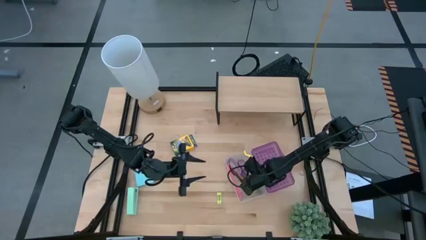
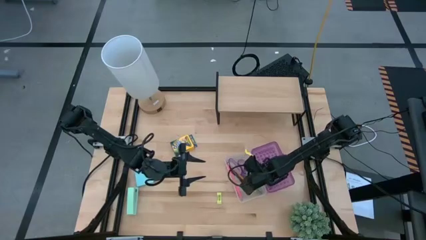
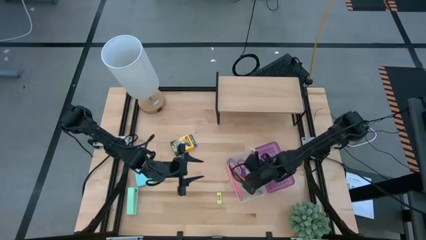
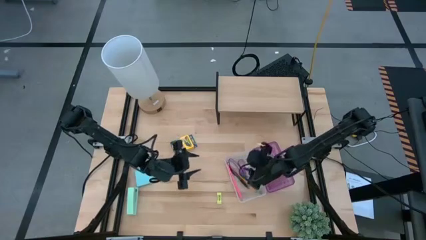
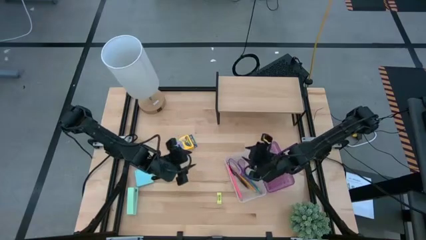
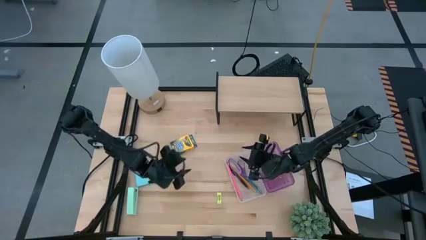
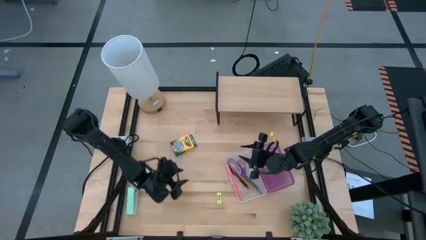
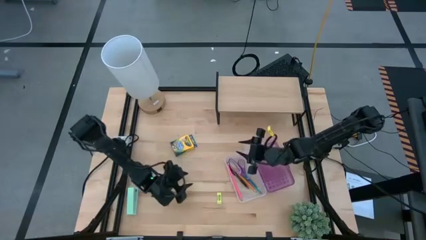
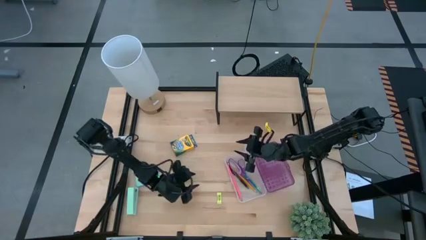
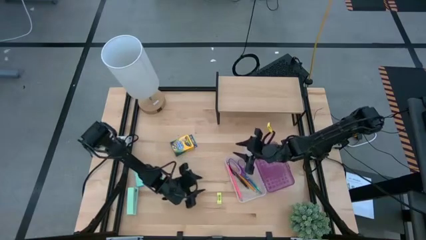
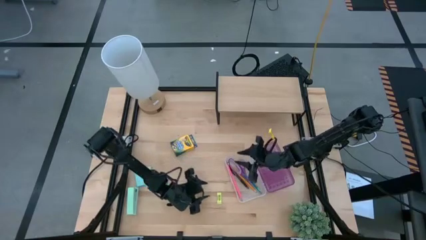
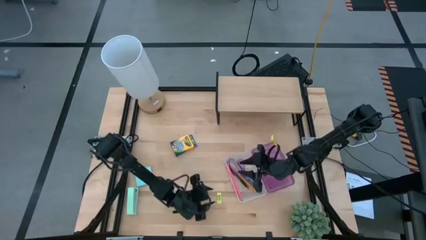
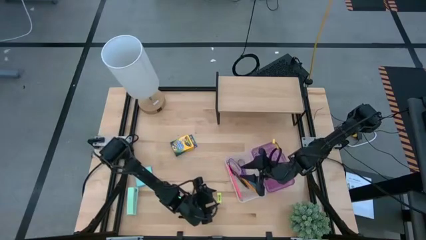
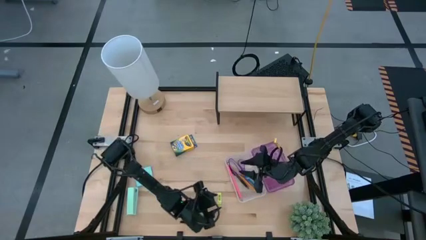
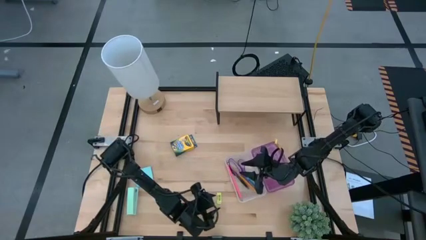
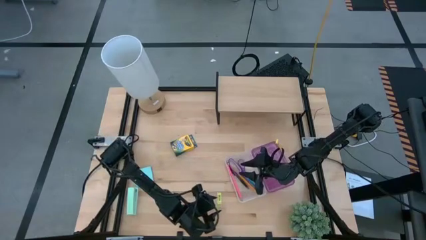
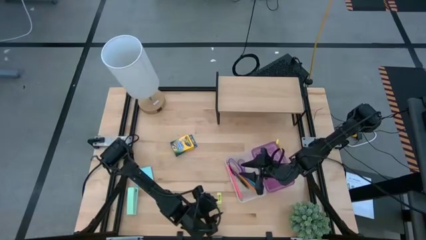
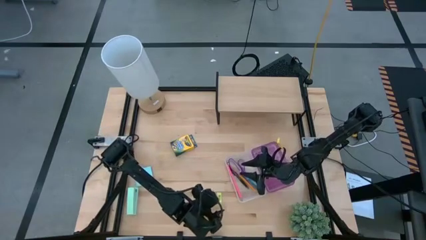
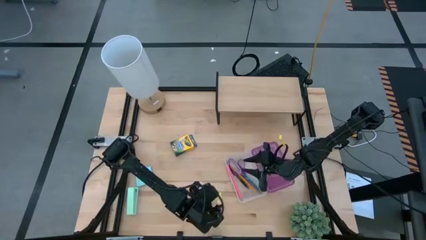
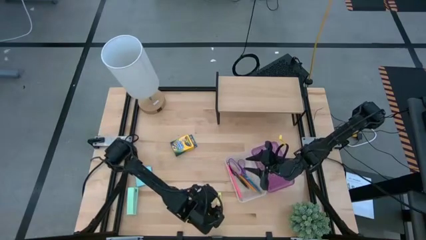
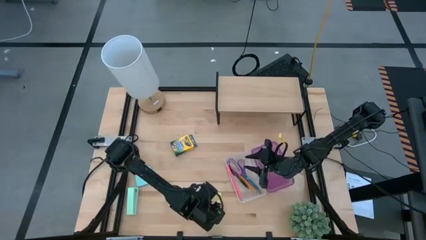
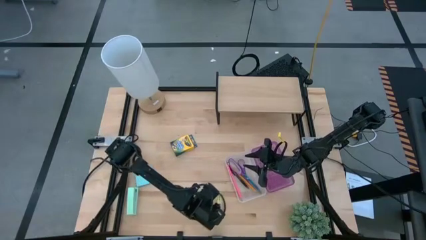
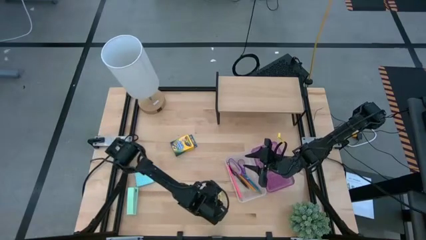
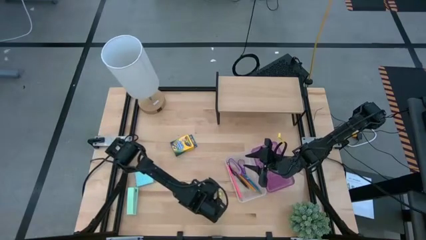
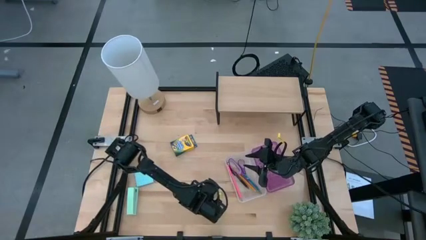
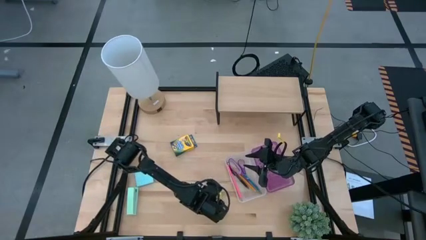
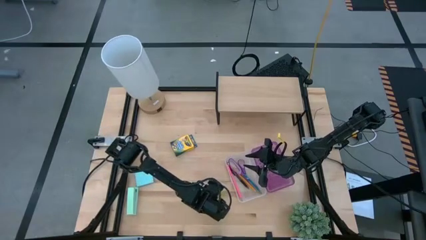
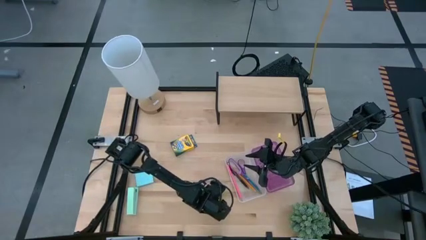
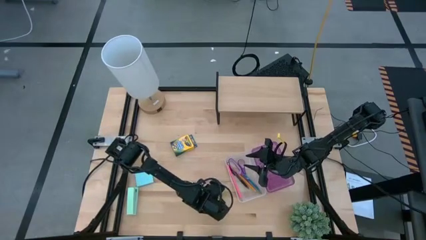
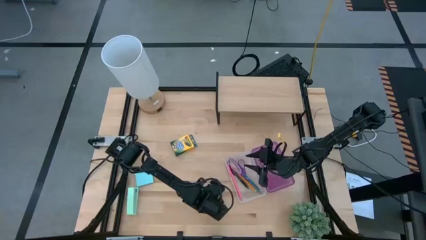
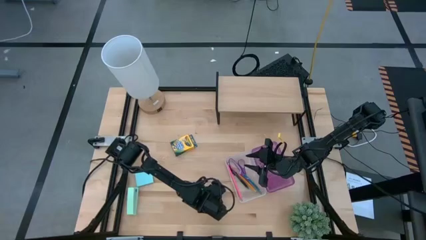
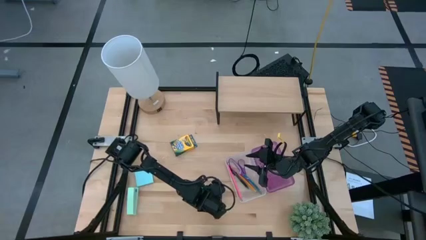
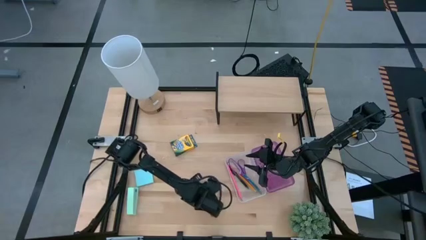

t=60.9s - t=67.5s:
Task: Pack school essentials
Put the yellow eraser into the purple supply box

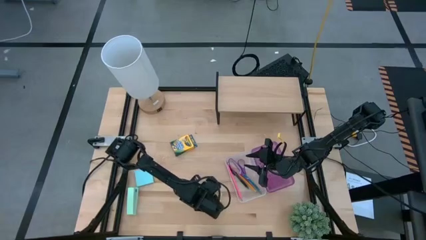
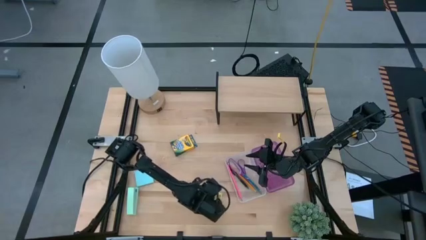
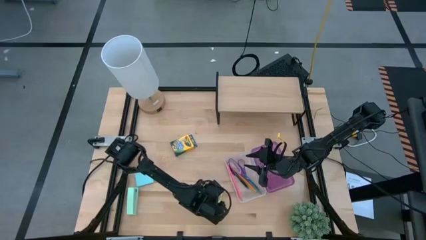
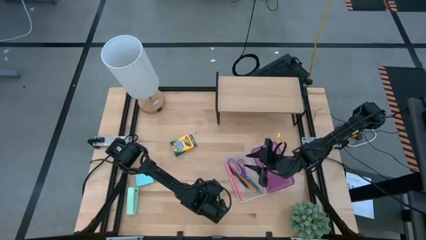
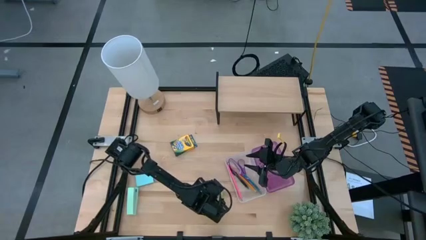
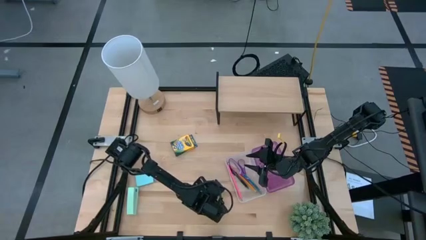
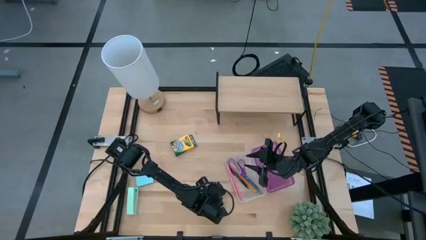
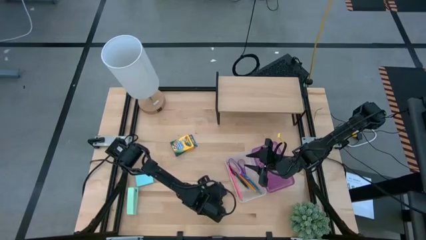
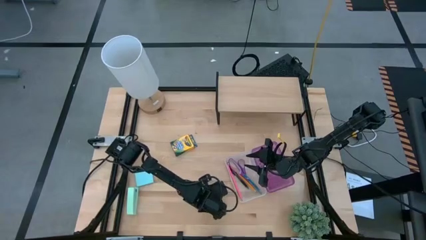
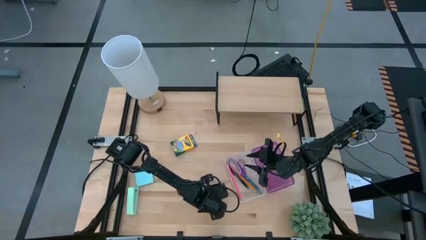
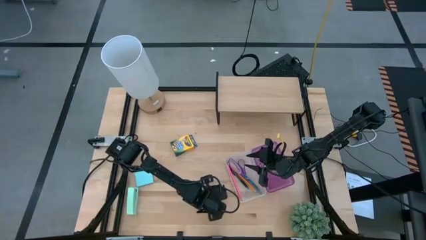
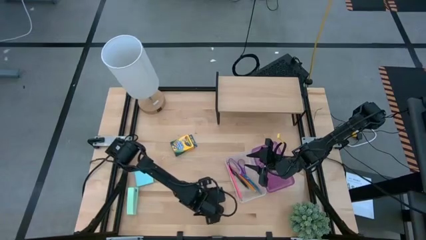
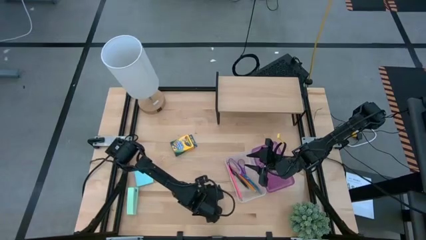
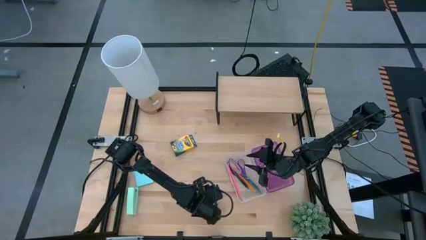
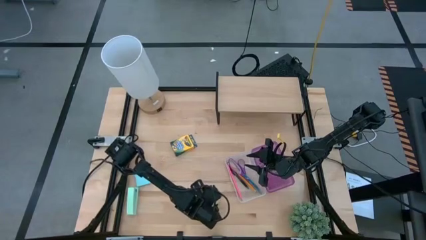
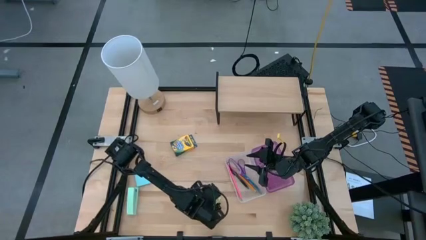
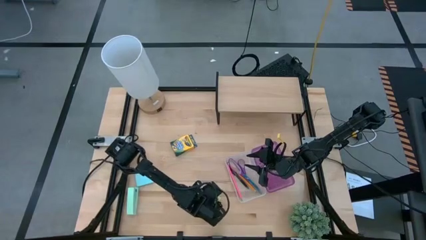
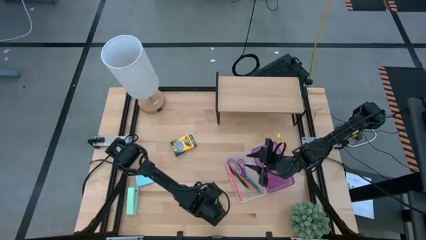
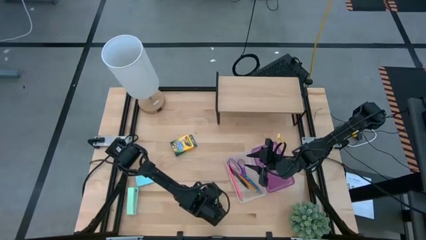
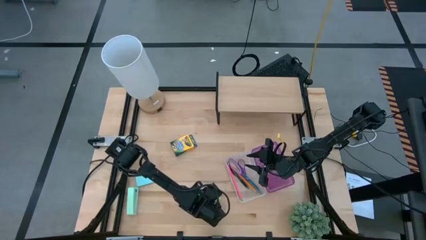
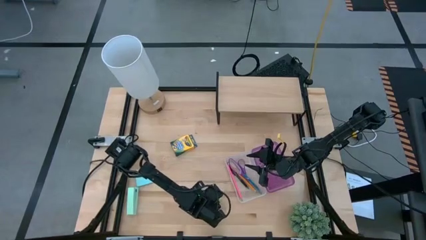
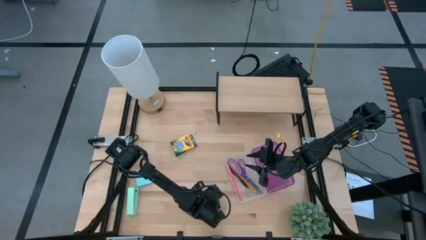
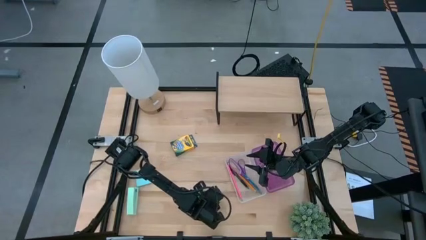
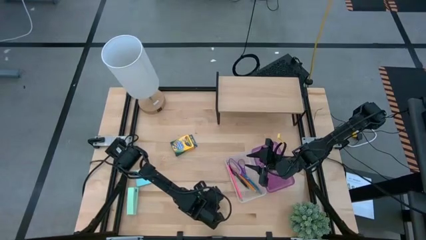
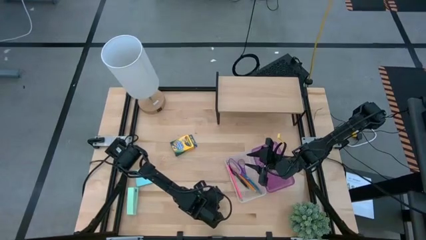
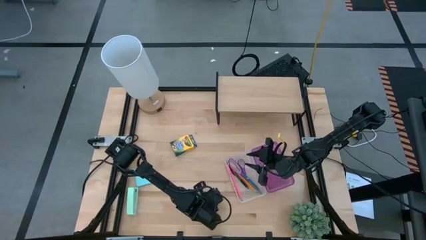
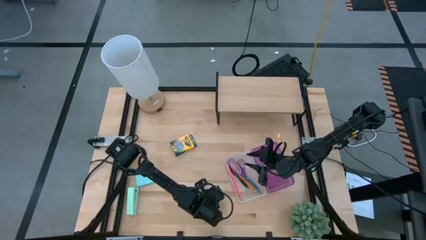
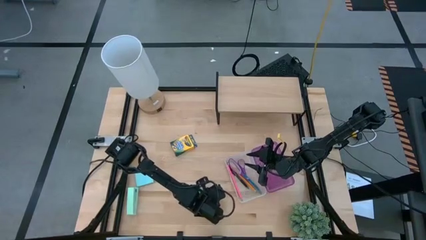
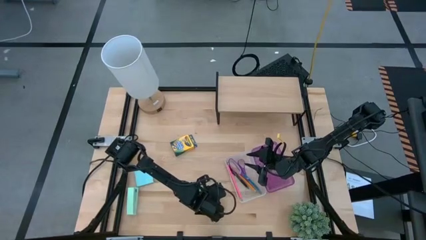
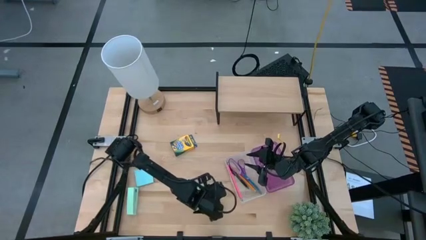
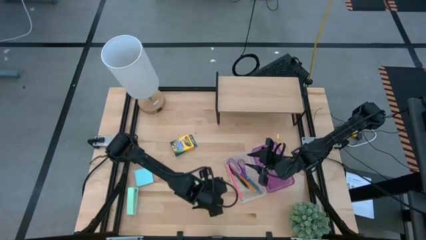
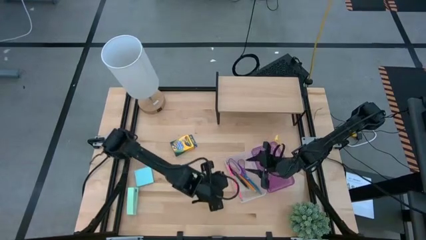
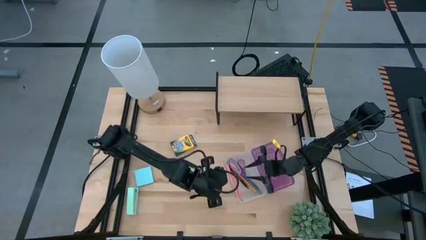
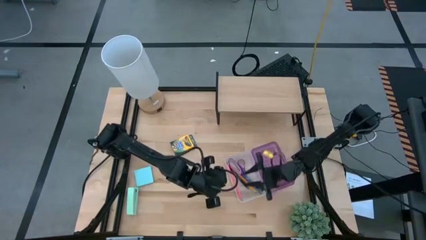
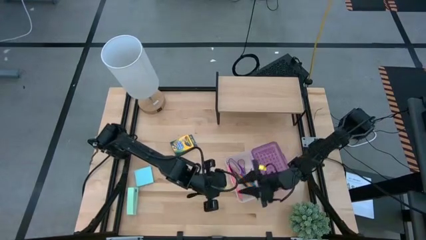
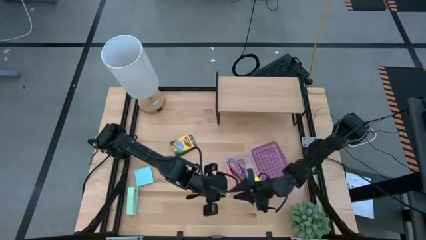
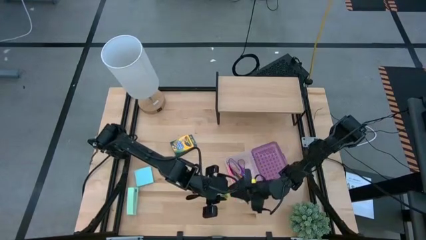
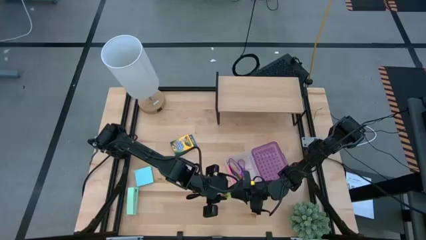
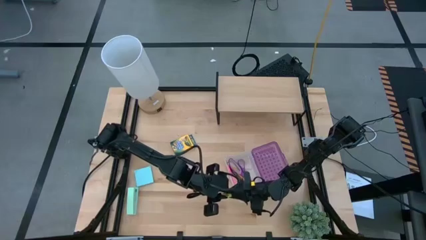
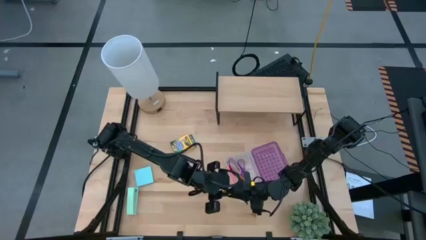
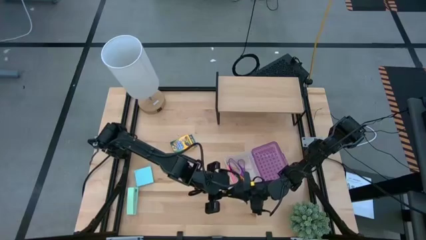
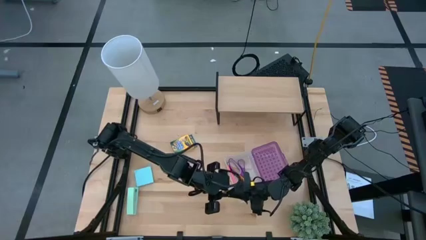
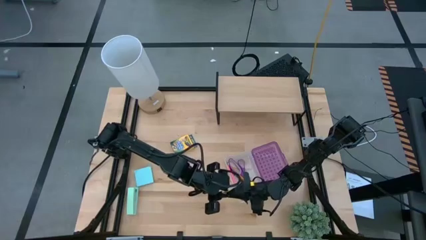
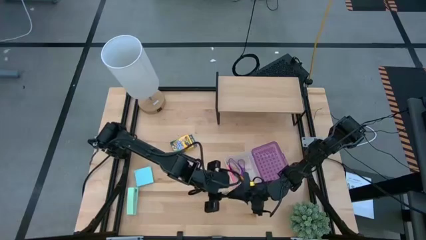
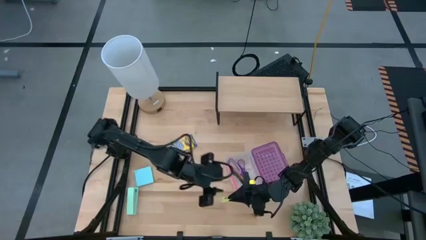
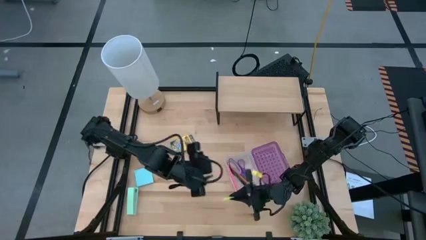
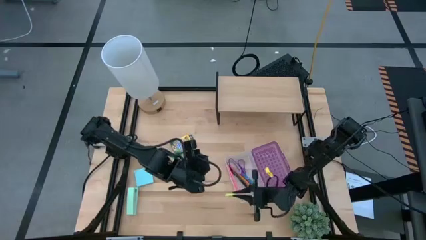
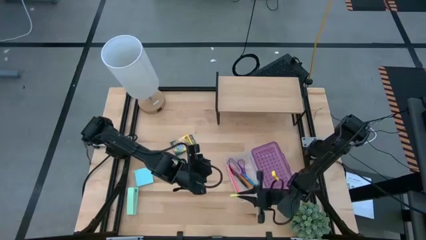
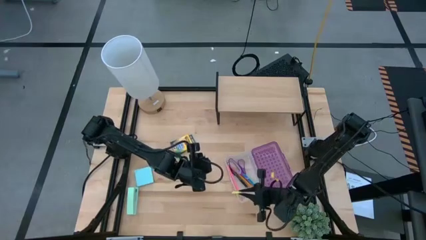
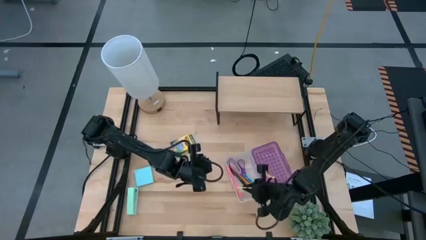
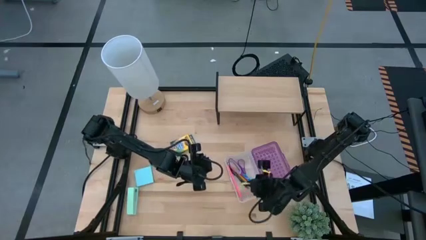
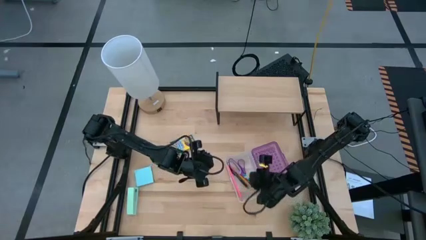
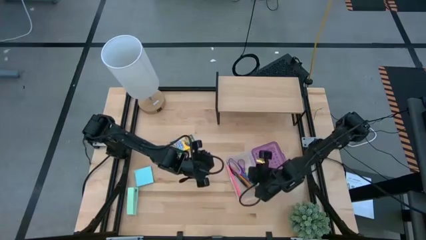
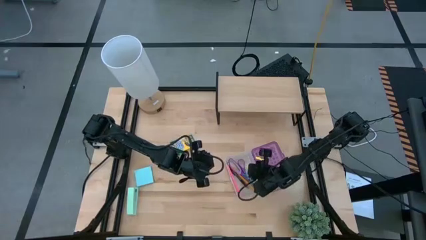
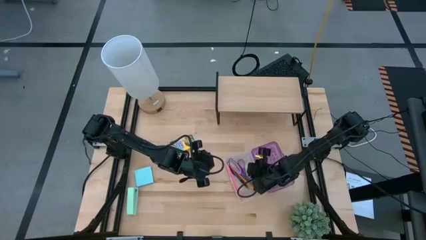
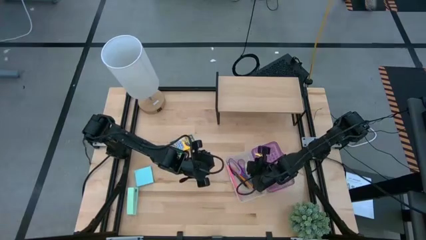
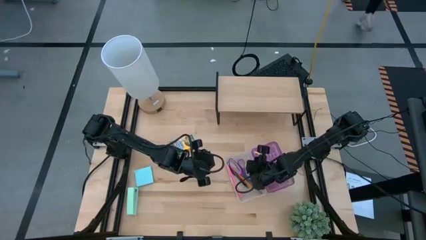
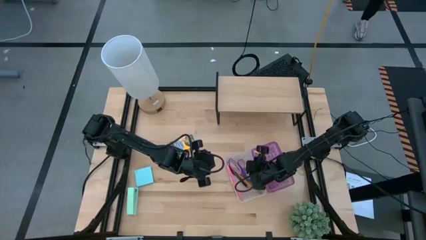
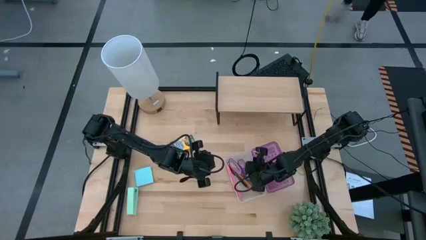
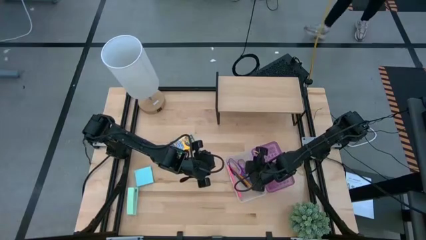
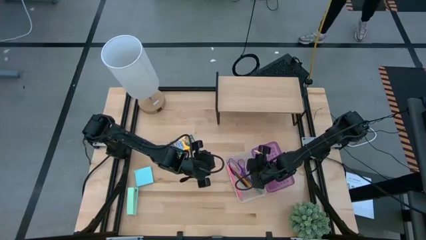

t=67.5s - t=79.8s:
Put the yellow eraser into the purple supply box
